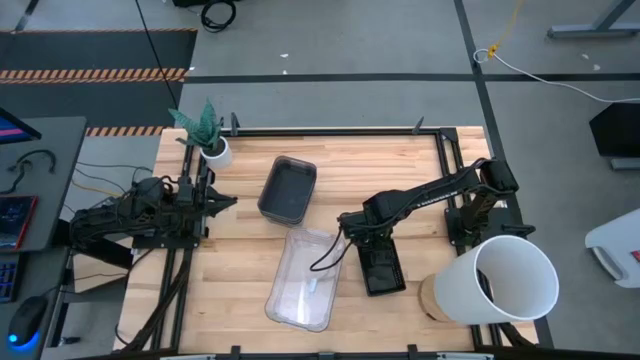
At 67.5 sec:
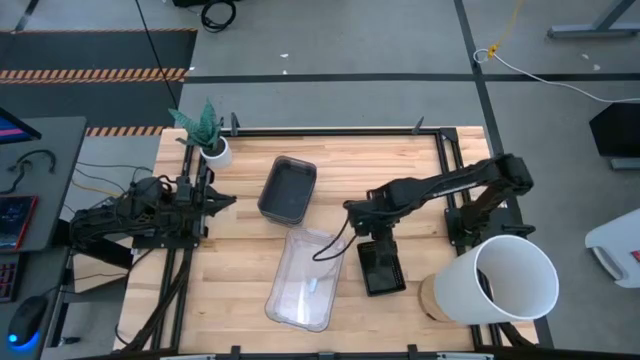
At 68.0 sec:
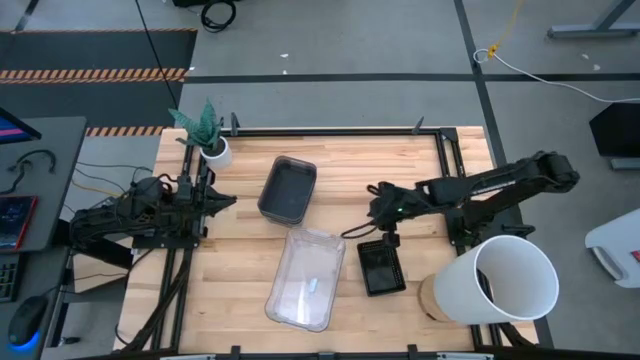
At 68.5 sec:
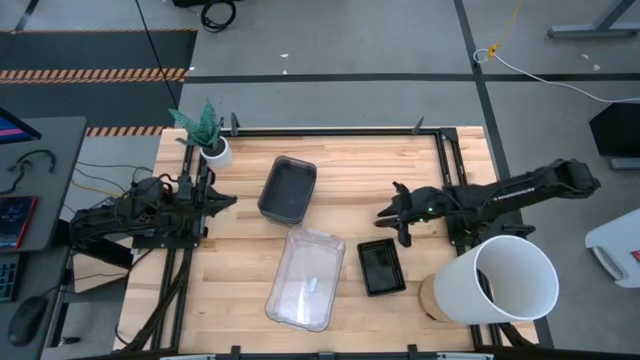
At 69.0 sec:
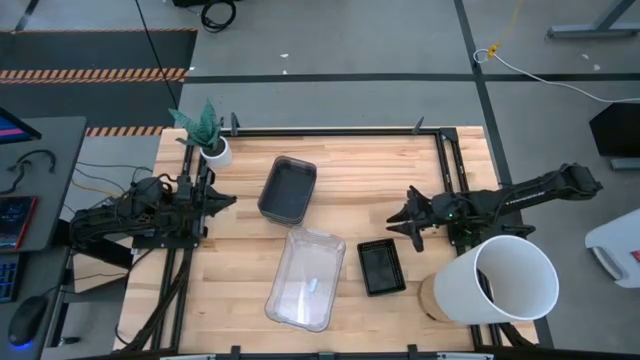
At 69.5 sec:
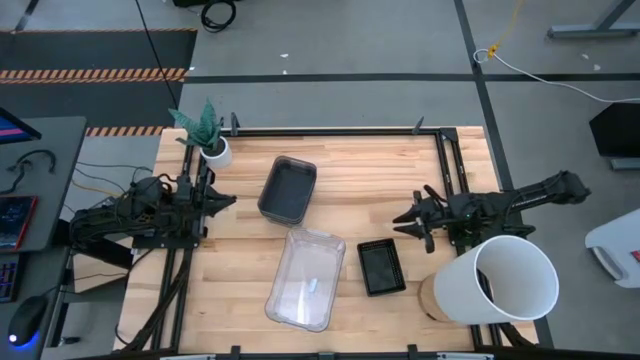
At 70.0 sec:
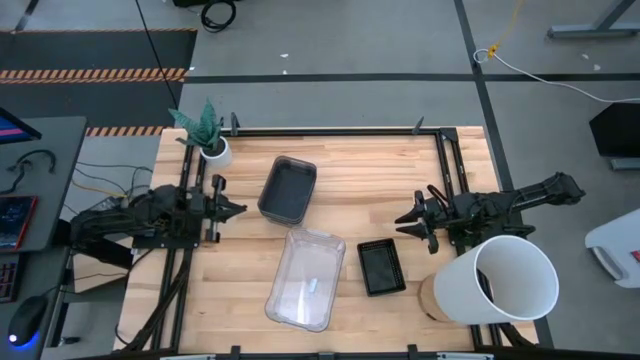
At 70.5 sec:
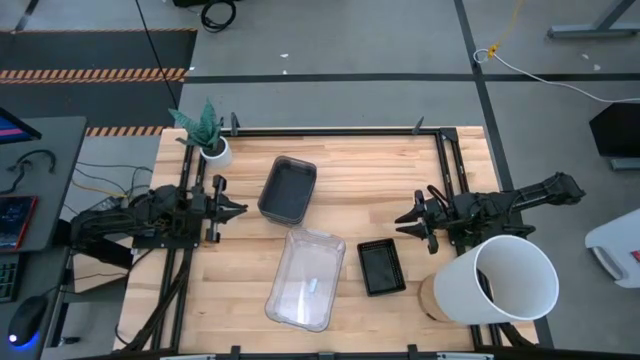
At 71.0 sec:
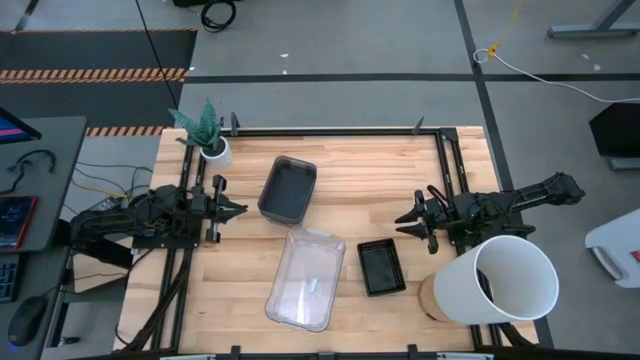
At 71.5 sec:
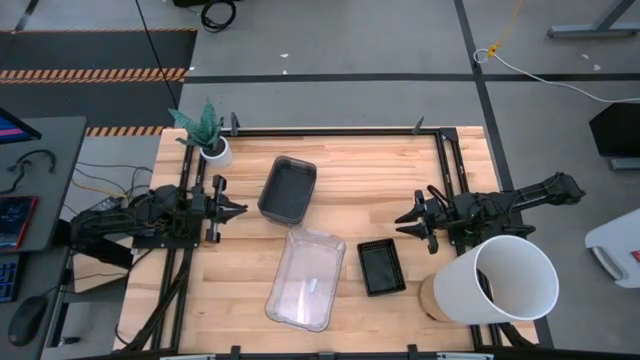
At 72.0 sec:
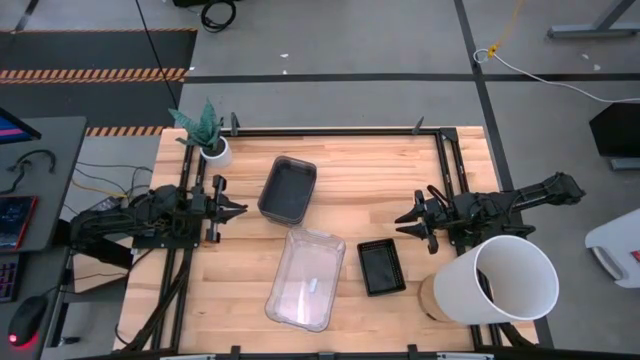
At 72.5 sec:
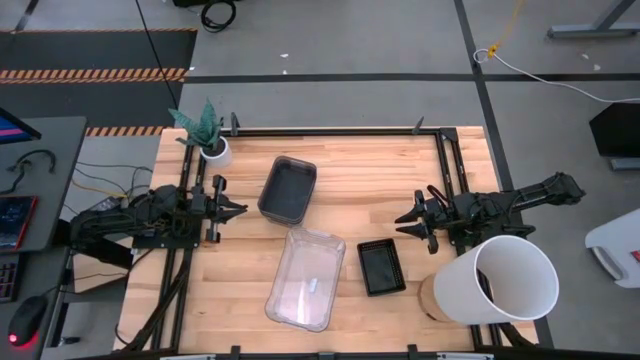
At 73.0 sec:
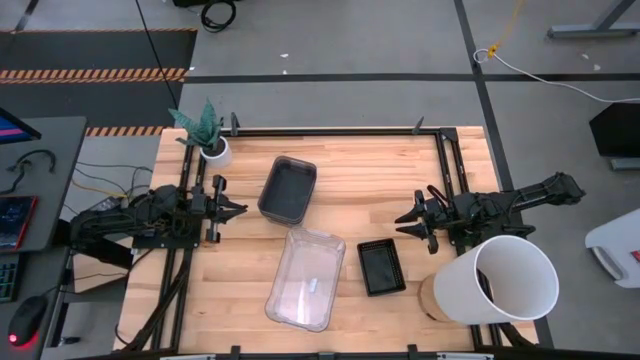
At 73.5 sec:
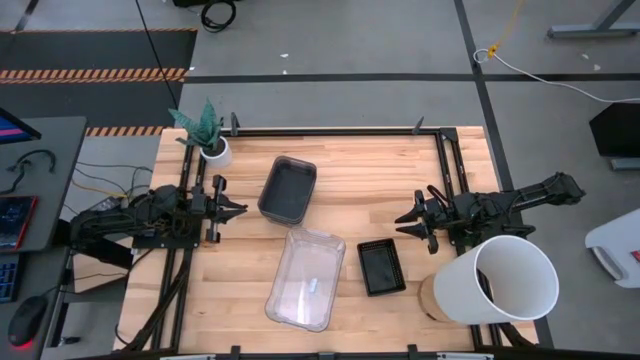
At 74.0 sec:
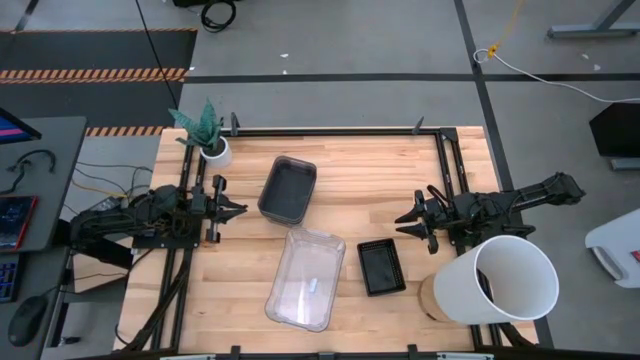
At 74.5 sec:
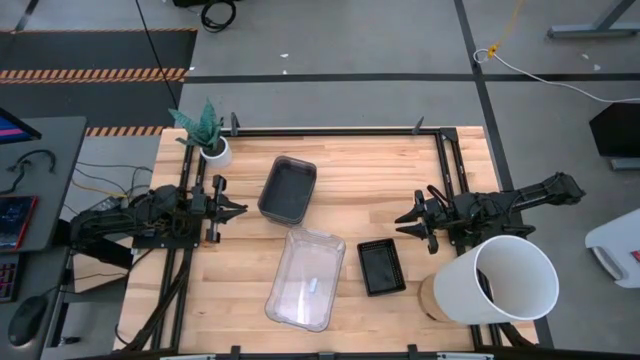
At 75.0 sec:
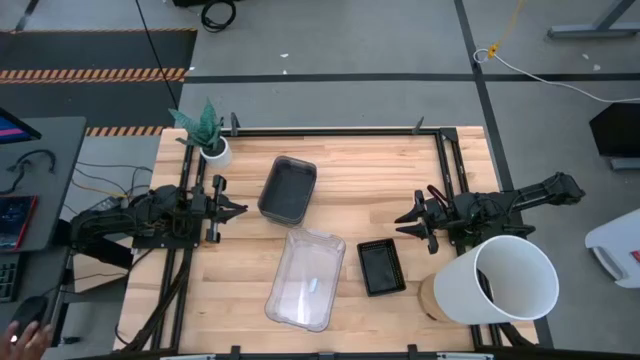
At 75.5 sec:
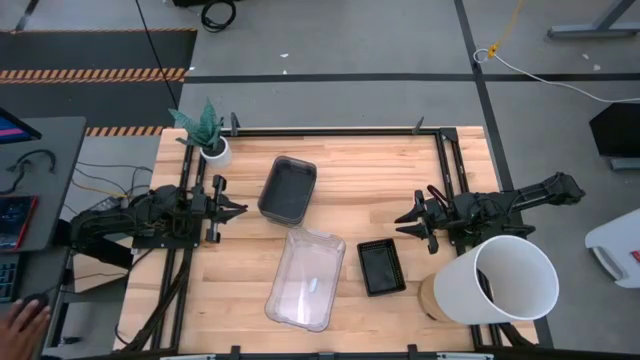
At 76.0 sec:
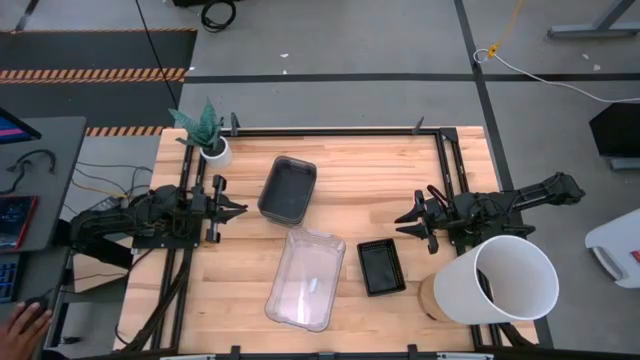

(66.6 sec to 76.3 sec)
Return to Home Position
